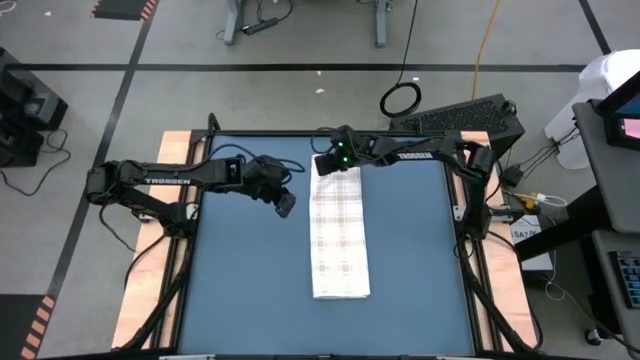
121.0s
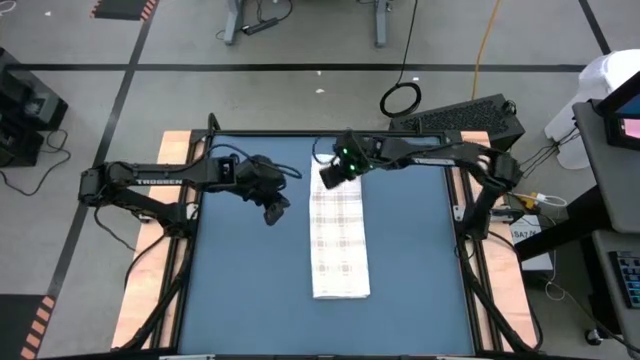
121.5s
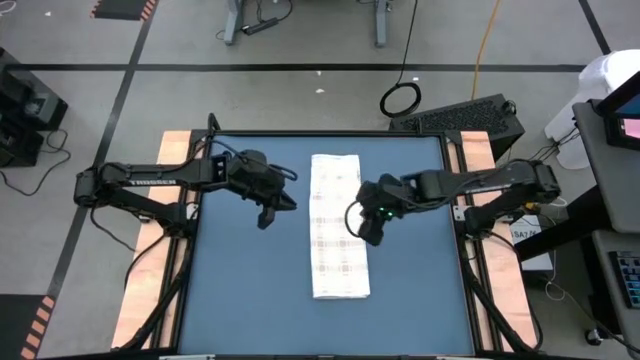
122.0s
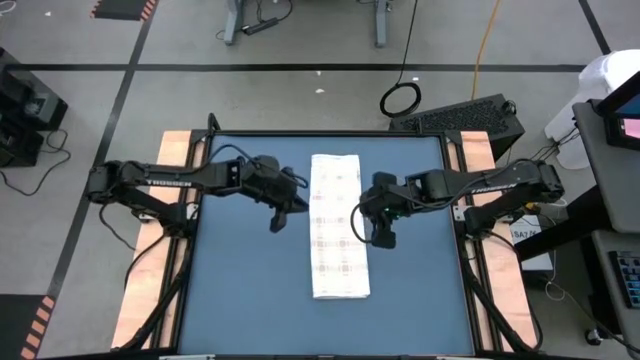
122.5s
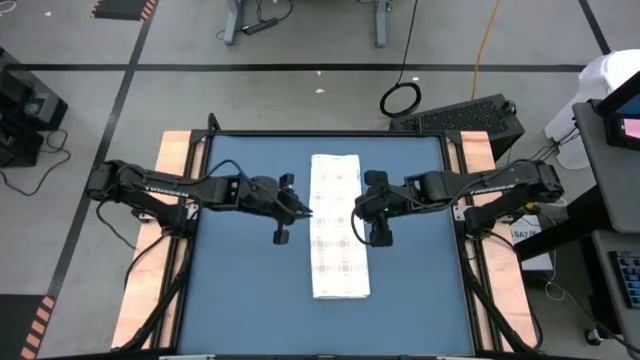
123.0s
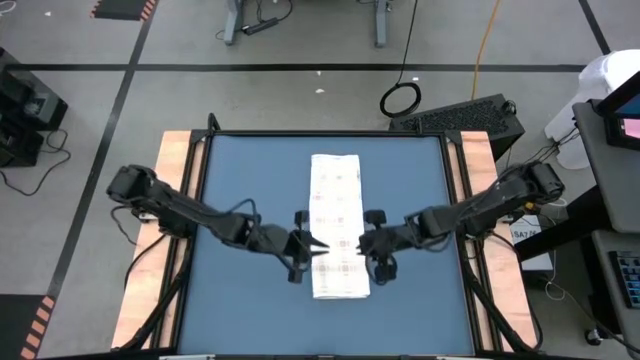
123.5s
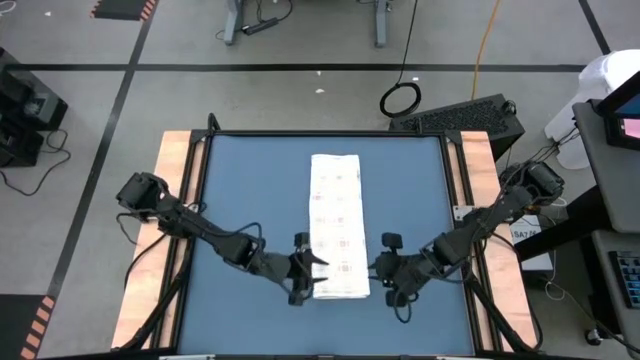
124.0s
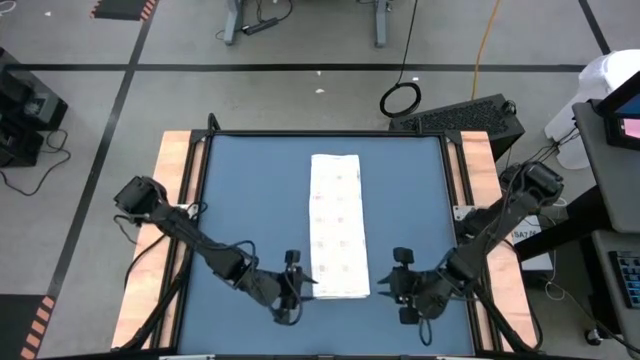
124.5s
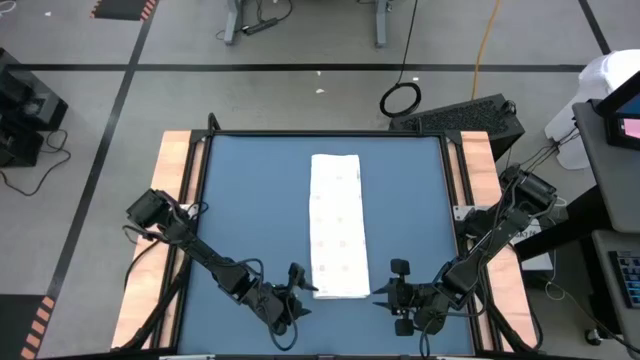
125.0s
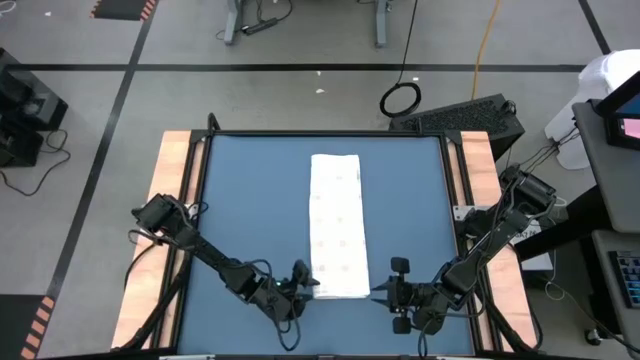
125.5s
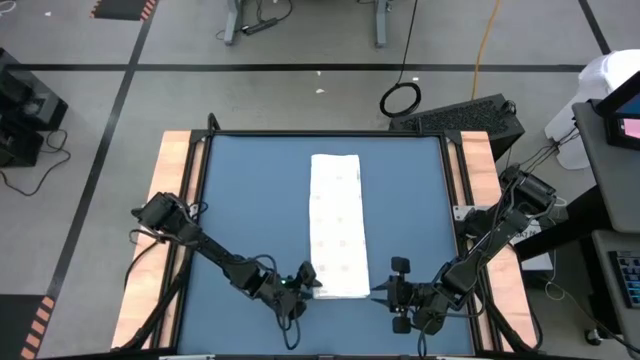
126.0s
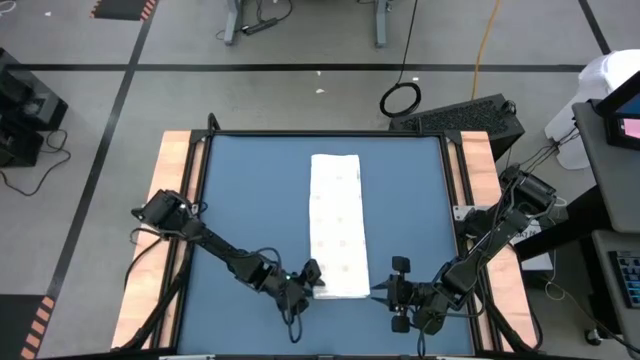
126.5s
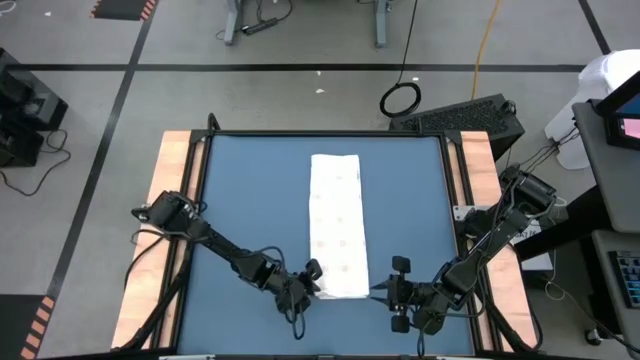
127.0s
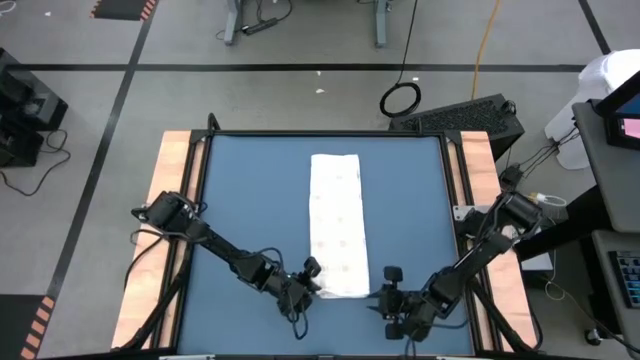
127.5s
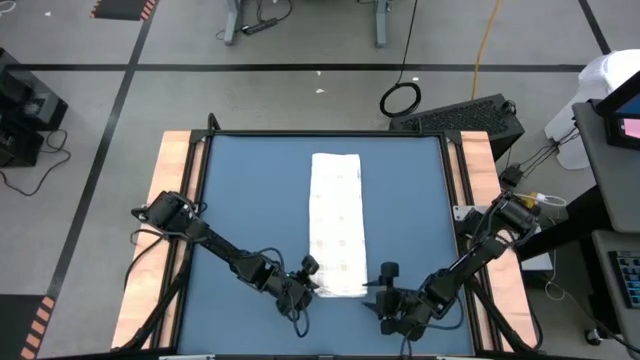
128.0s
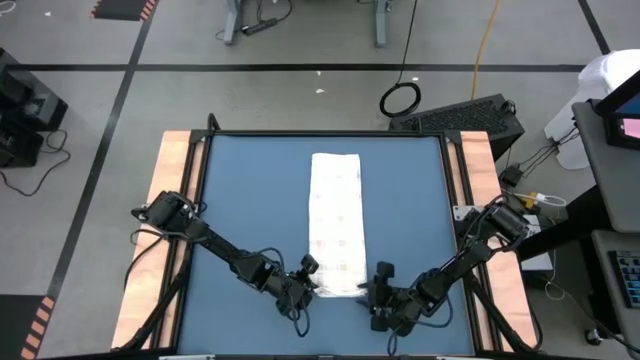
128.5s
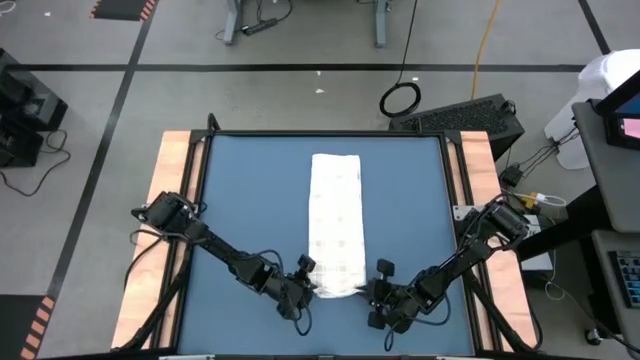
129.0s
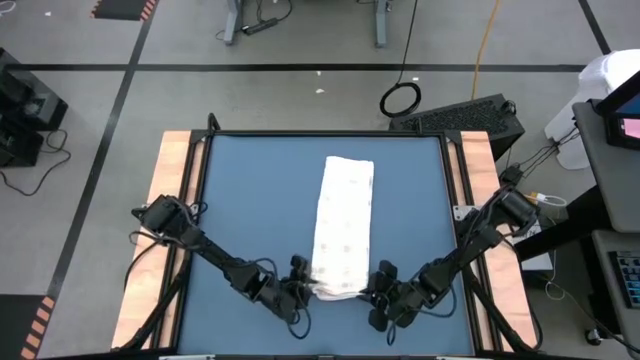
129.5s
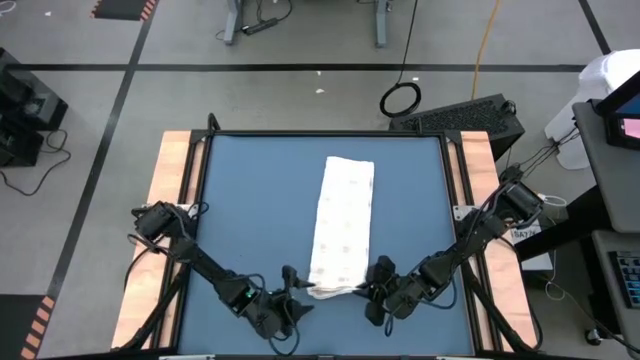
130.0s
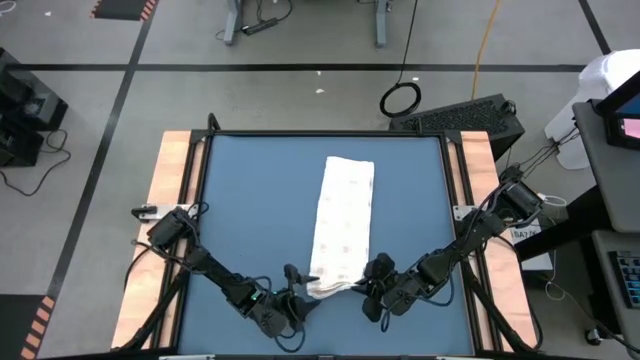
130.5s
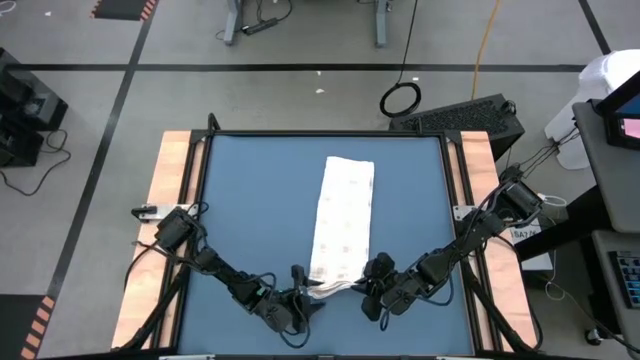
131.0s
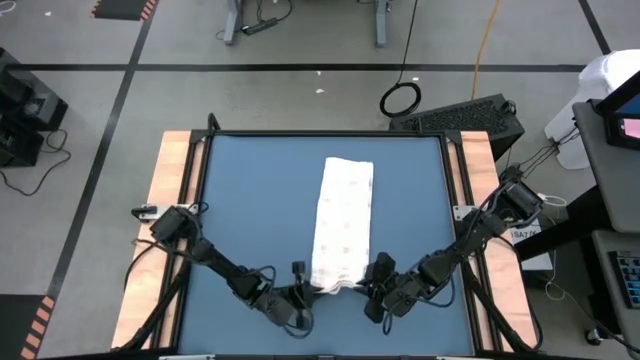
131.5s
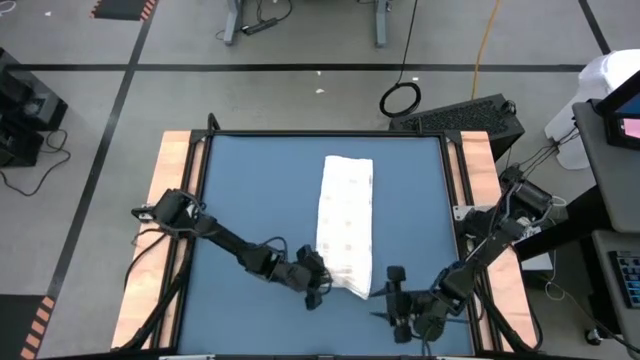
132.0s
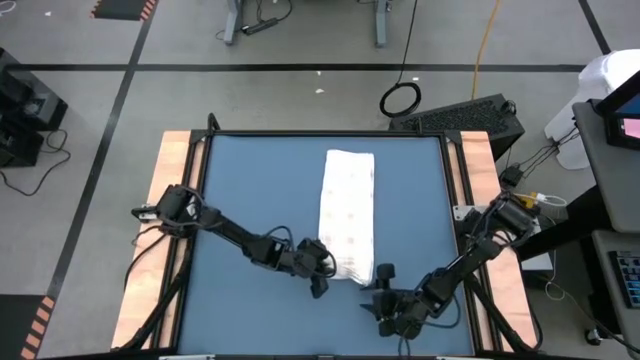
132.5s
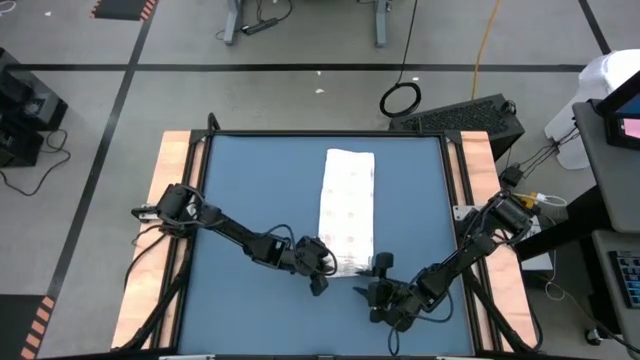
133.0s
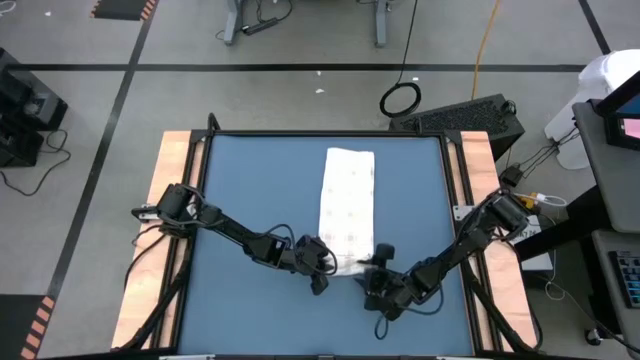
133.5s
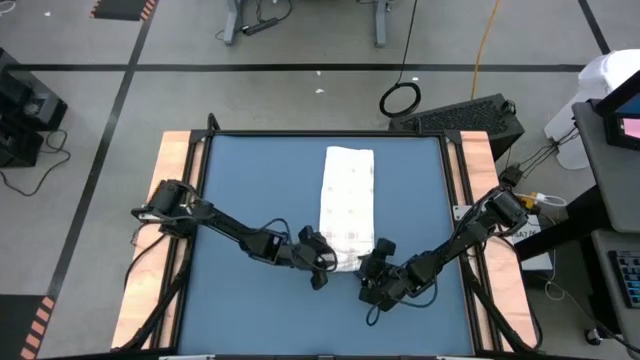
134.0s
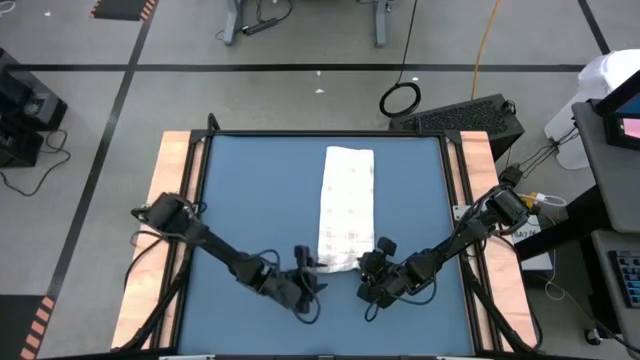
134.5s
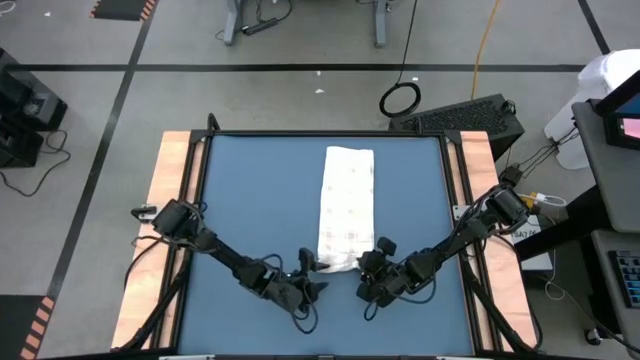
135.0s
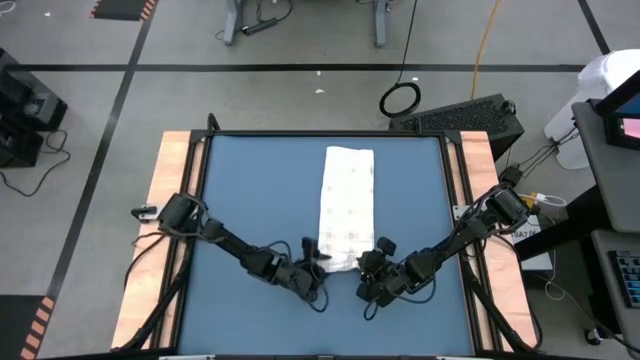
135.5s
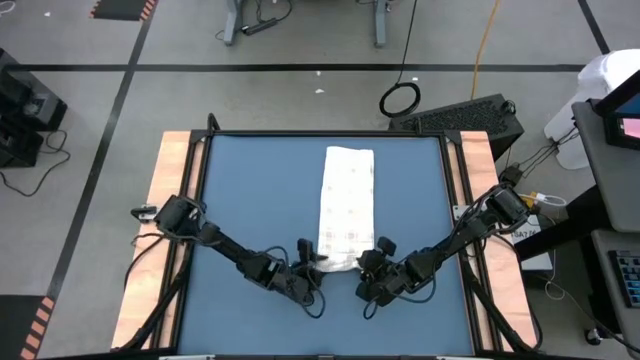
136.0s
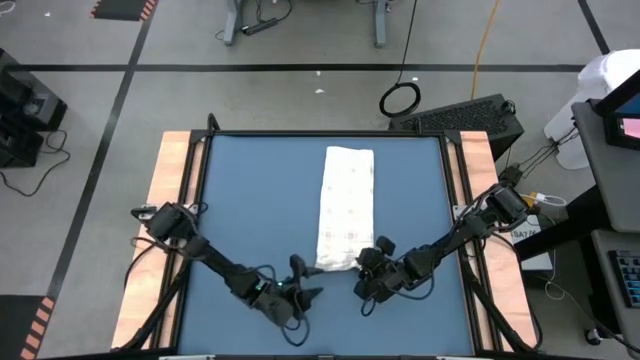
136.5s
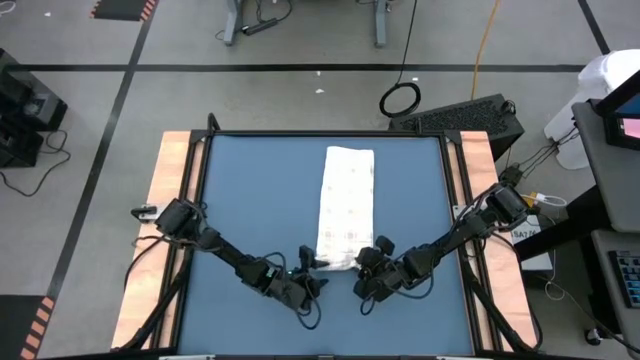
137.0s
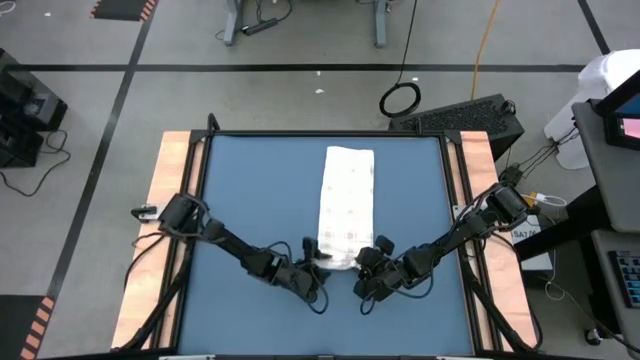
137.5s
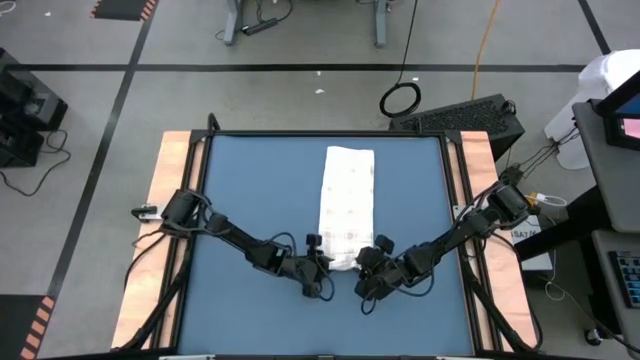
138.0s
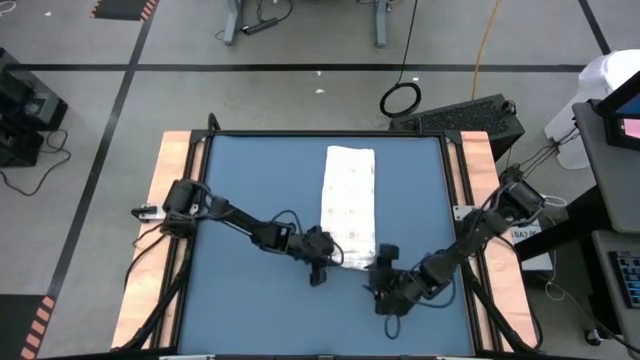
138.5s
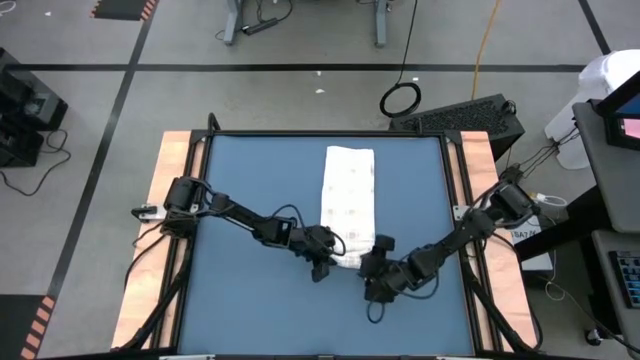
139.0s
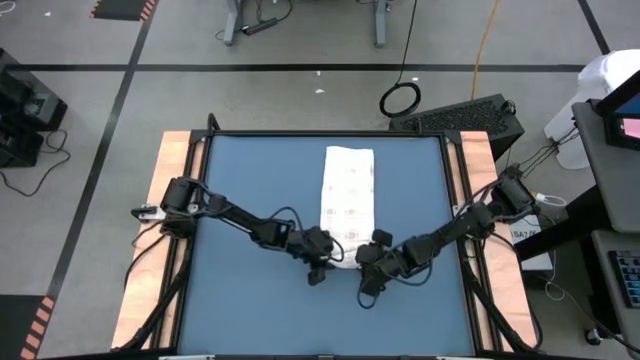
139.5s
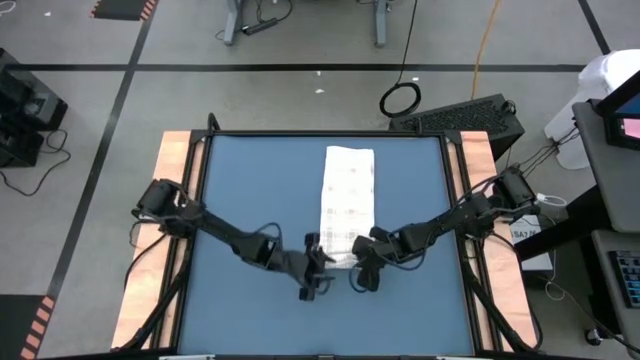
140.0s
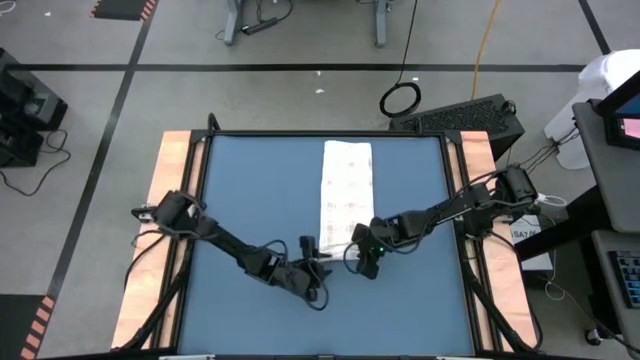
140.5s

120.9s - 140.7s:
Task: Roll towel
Roll the white towel

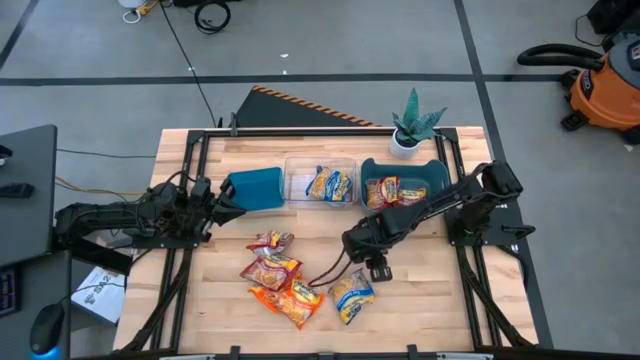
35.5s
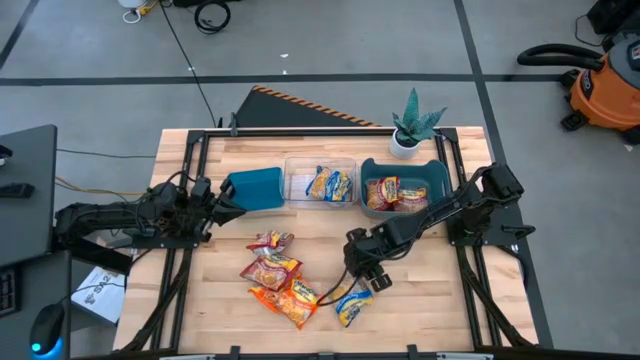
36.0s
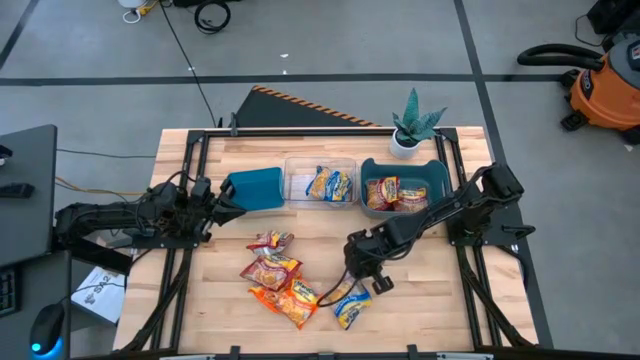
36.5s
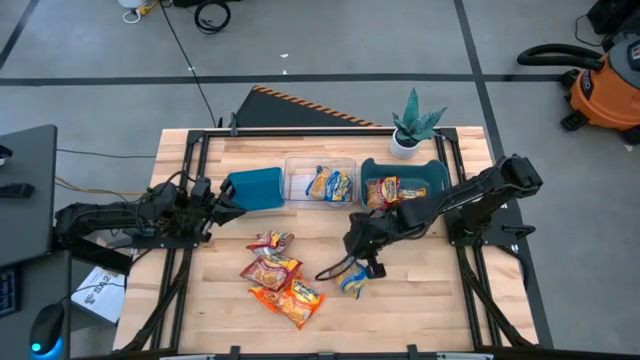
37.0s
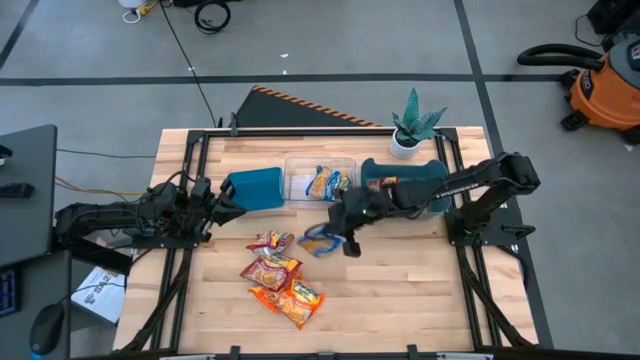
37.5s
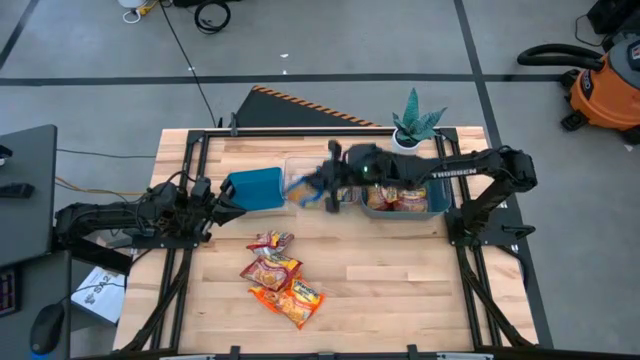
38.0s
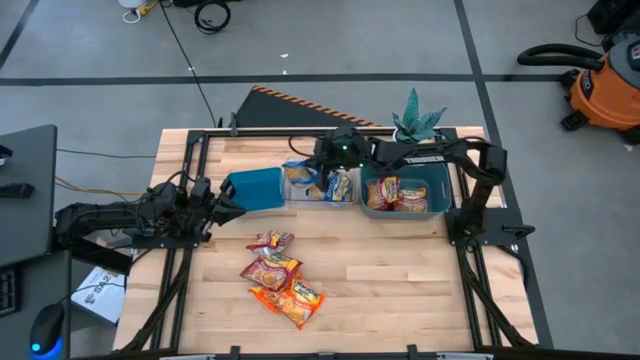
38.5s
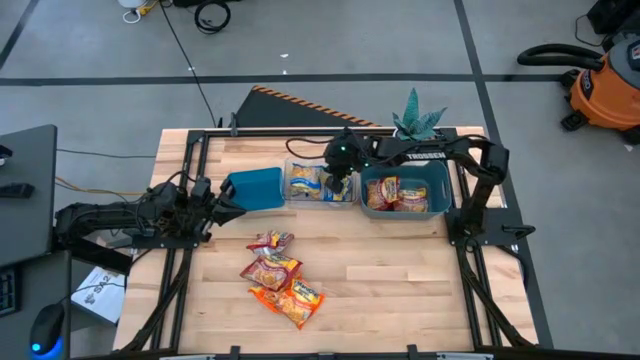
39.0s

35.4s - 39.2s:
Task: Sort Maruchan noodles
Put the blue noddle pack into the transparent bin
